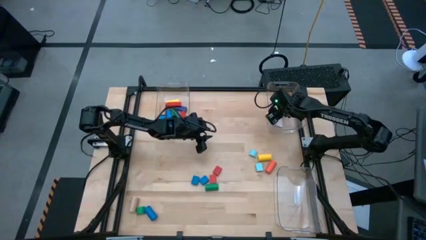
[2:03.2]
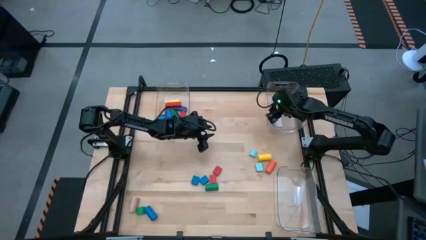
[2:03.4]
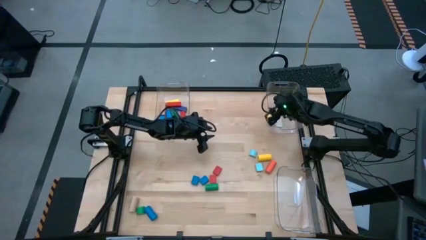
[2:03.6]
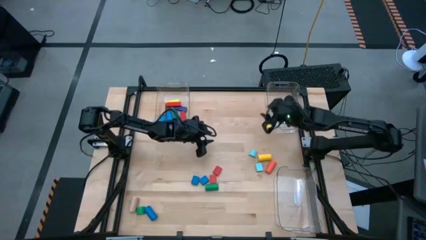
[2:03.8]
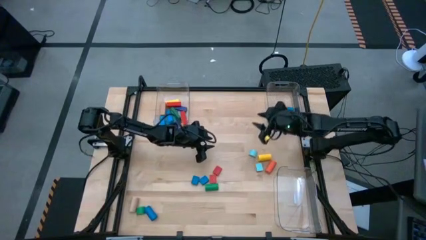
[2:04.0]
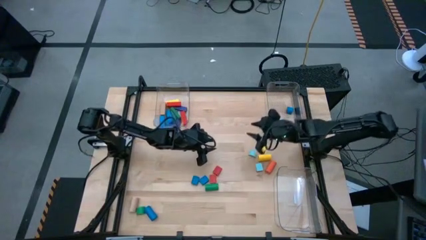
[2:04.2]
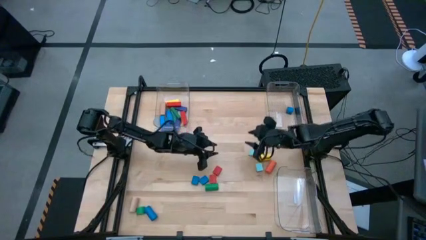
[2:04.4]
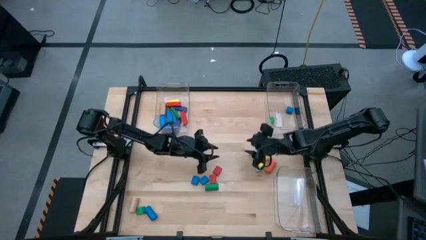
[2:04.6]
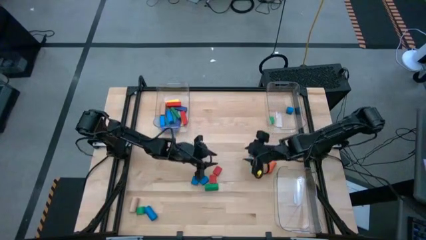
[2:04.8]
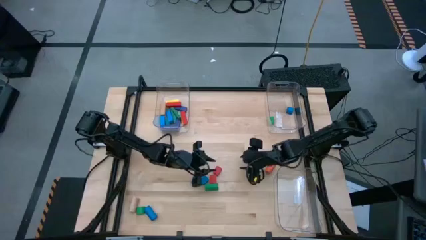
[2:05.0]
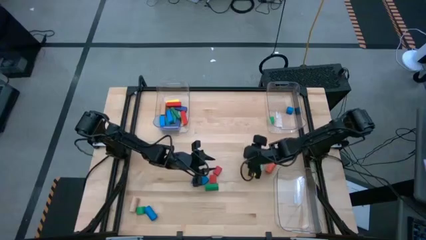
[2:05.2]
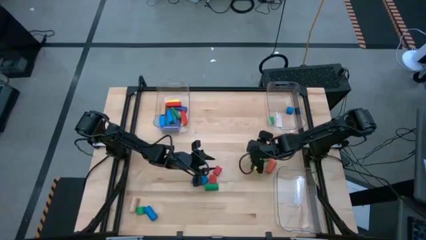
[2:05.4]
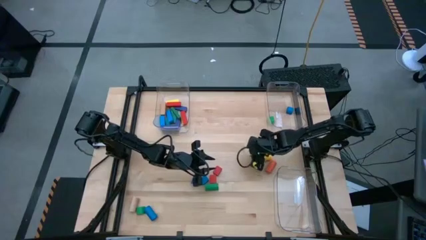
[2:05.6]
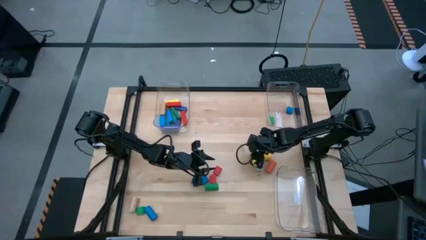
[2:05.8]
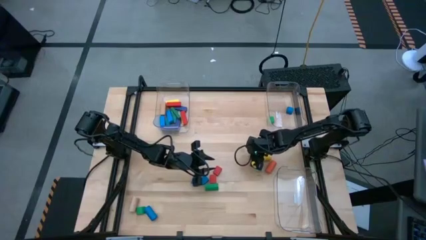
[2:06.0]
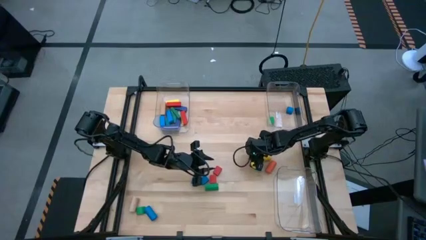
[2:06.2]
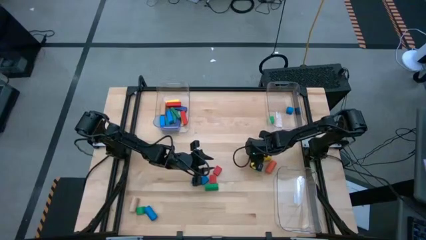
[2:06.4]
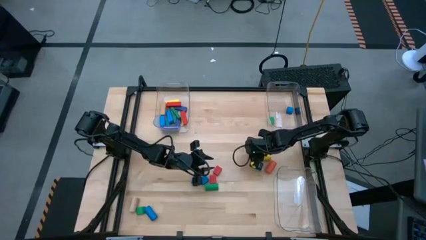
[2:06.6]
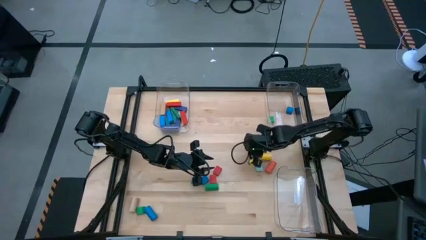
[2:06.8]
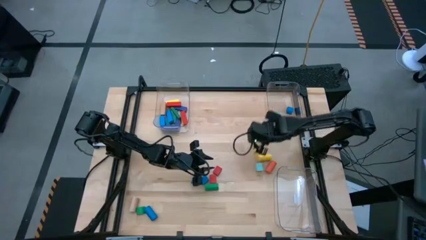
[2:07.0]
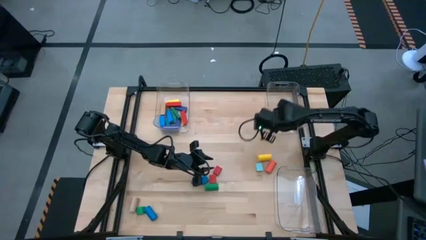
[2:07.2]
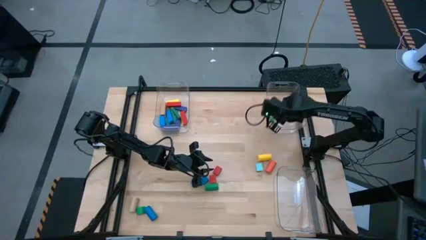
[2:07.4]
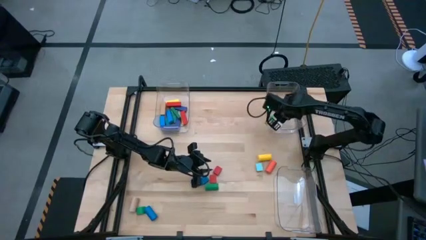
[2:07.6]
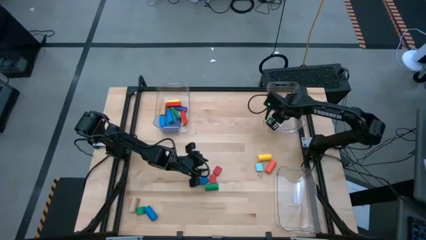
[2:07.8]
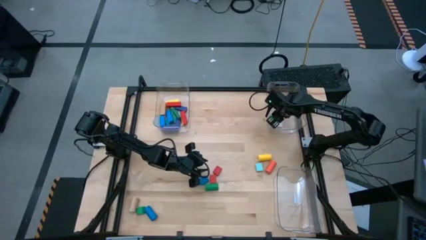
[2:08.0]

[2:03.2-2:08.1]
Task: Sort blocks by size
Put the light blue half-circle block into the top right transparent bin

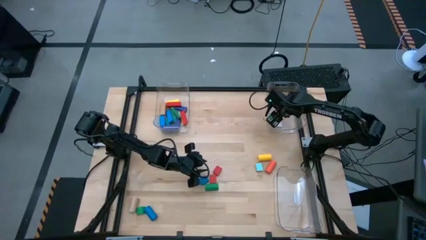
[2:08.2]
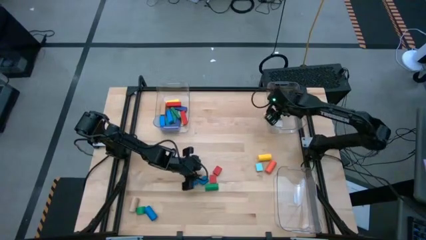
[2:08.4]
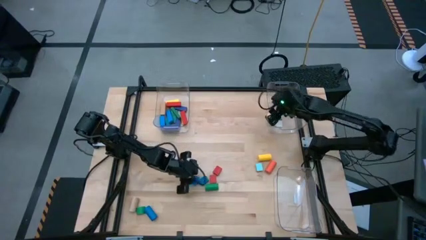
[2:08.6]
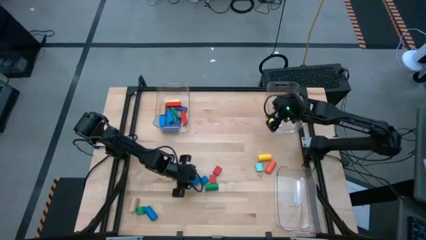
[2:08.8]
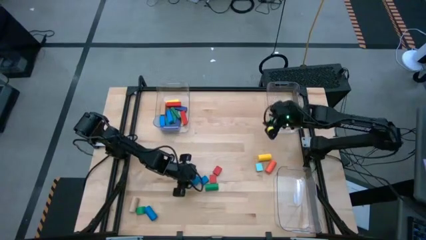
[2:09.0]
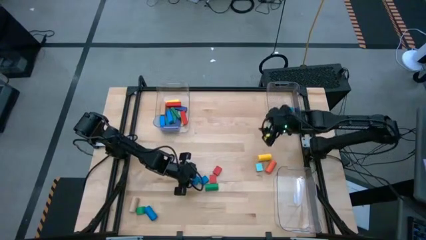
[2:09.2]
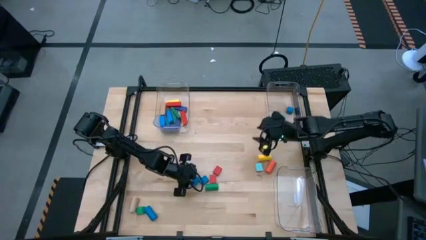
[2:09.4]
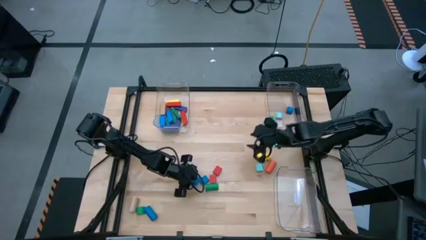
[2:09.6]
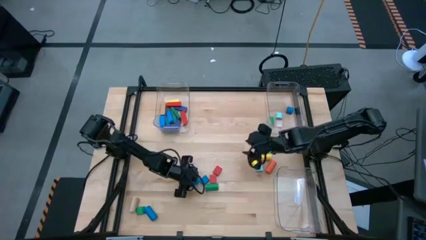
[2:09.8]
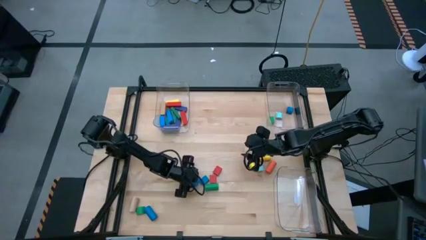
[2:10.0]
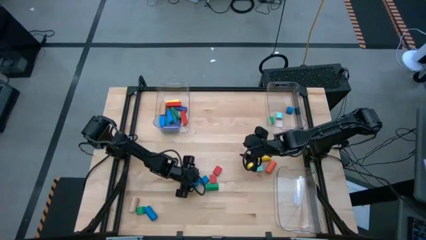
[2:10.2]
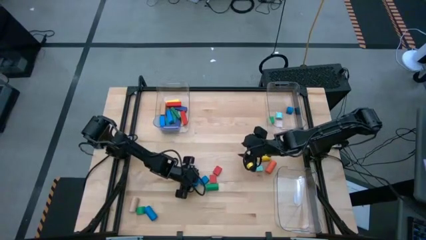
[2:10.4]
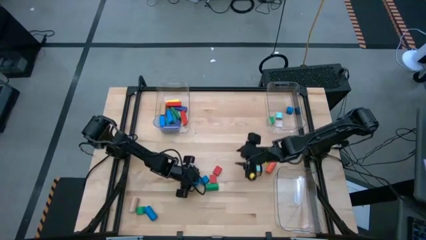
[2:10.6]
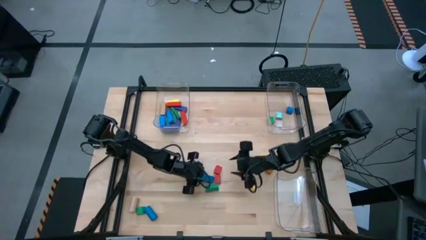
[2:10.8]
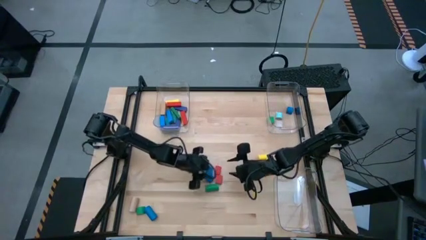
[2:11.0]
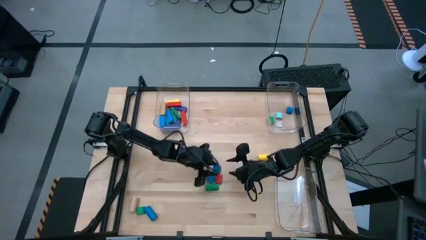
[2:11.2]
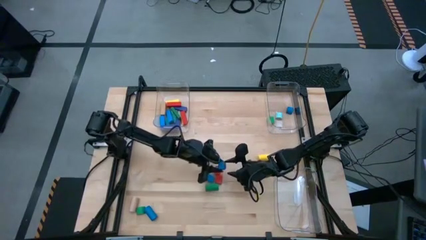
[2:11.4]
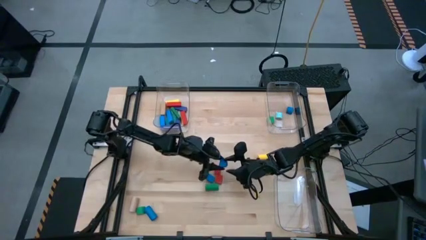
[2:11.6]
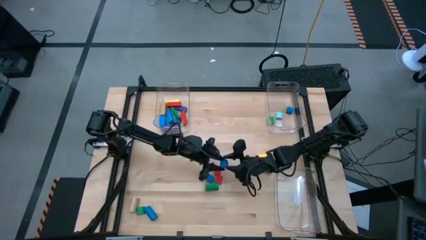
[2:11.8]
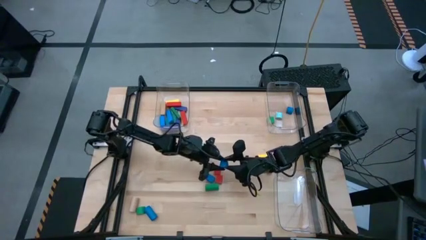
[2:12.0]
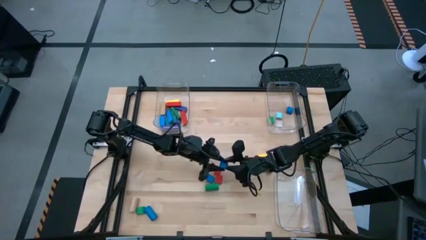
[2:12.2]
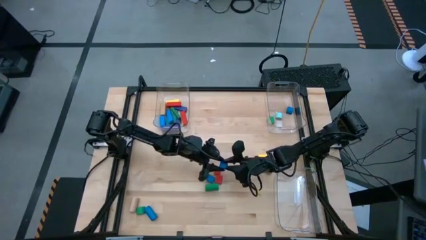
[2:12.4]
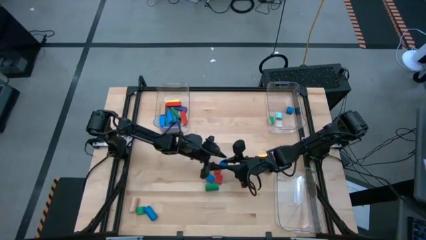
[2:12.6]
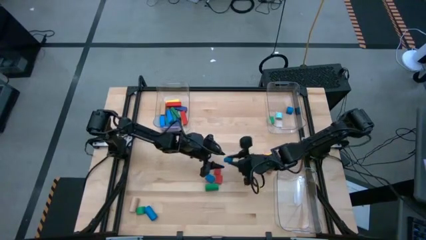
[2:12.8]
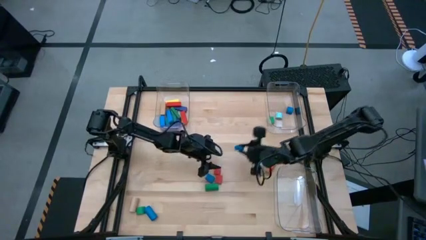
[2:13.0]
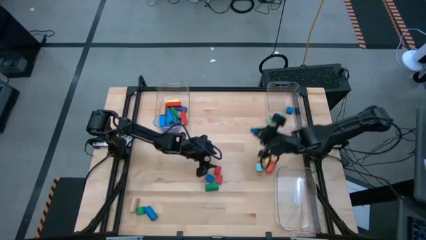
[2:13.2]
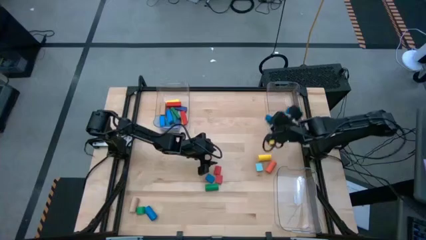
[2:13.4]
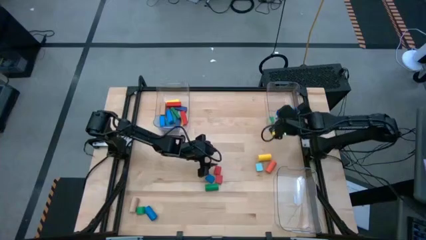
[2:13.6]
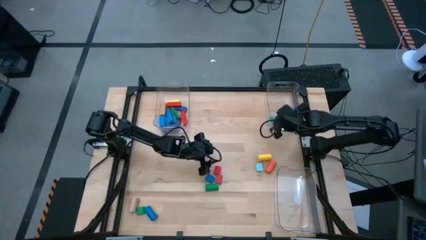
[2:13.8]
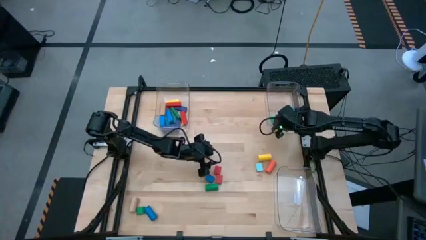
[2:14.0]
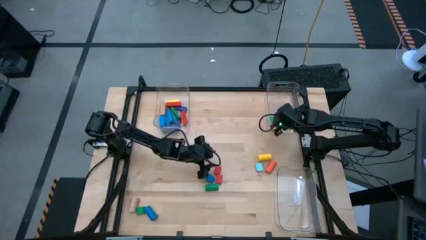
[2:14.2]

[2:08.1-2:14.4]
Put the blue half-circle block into the top right transparent bin

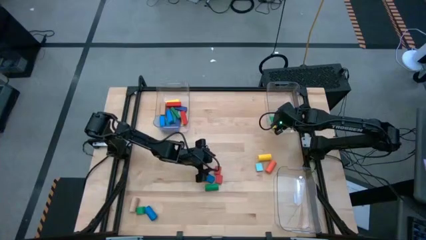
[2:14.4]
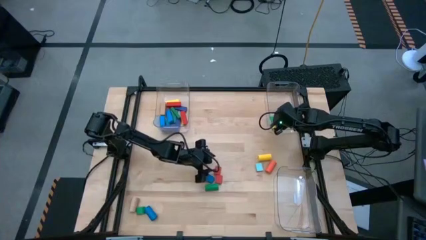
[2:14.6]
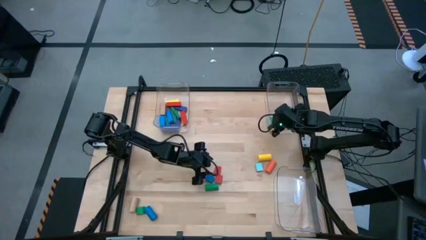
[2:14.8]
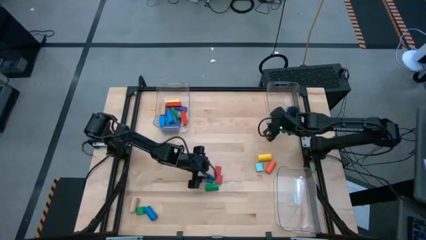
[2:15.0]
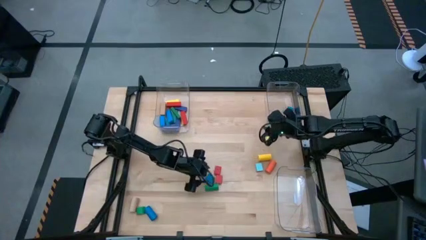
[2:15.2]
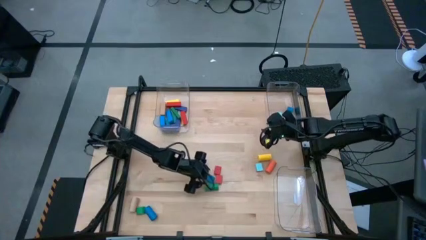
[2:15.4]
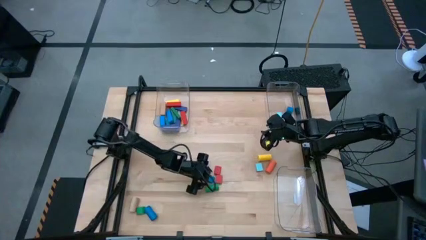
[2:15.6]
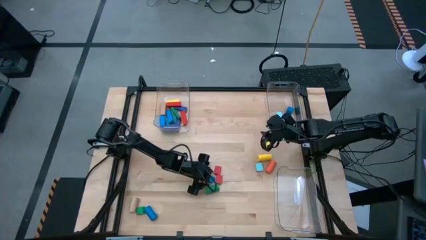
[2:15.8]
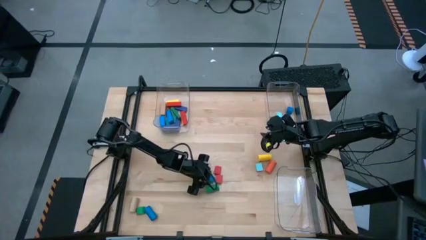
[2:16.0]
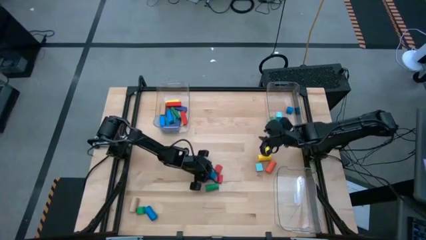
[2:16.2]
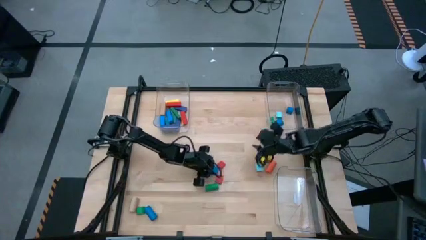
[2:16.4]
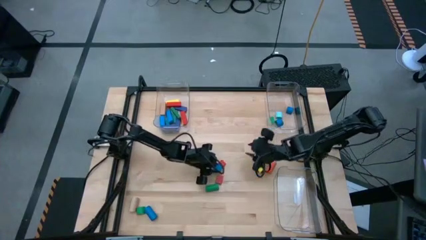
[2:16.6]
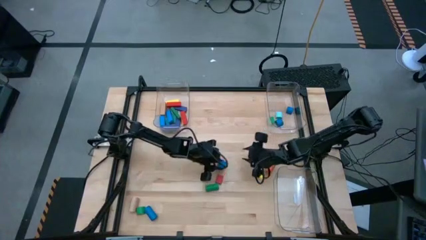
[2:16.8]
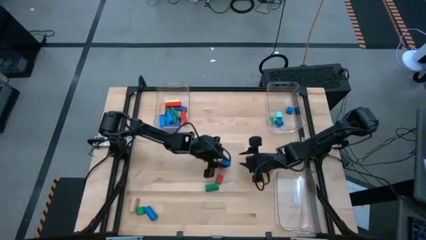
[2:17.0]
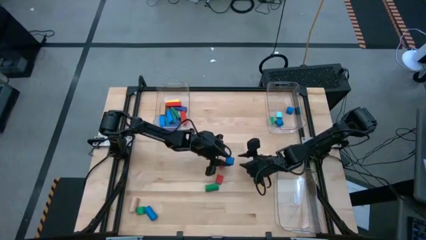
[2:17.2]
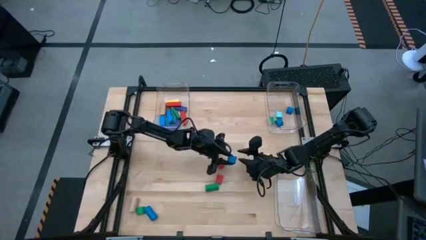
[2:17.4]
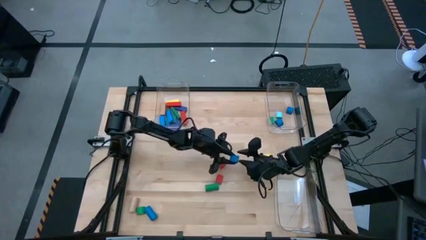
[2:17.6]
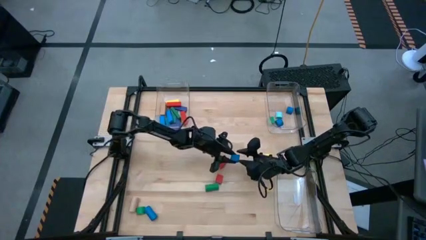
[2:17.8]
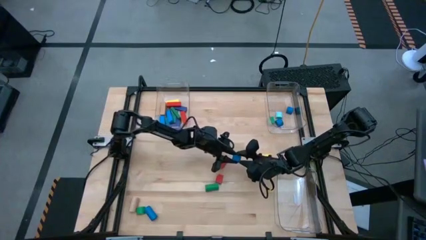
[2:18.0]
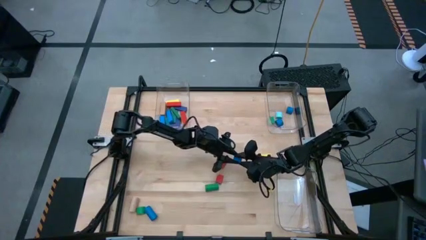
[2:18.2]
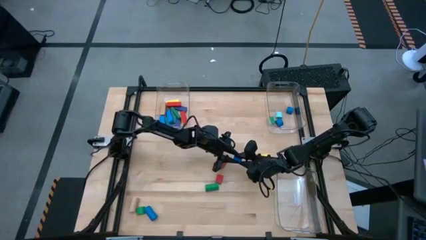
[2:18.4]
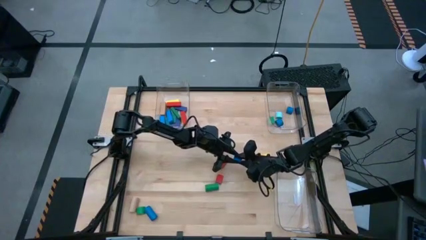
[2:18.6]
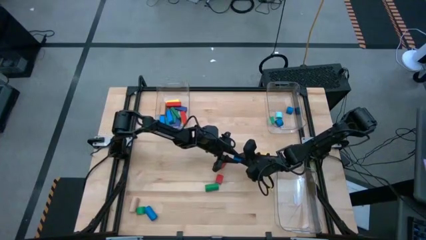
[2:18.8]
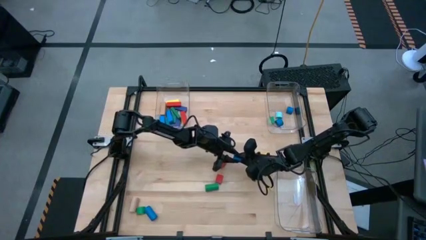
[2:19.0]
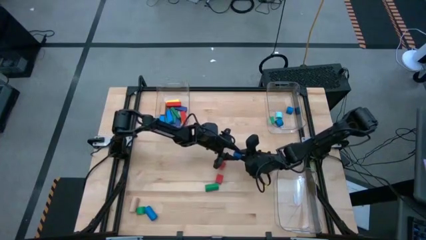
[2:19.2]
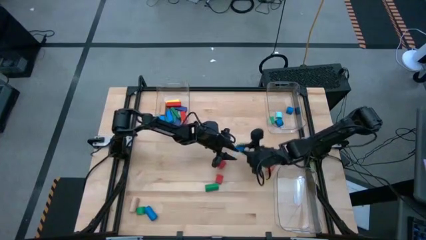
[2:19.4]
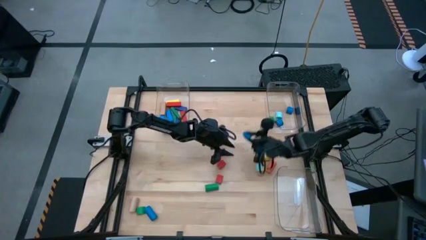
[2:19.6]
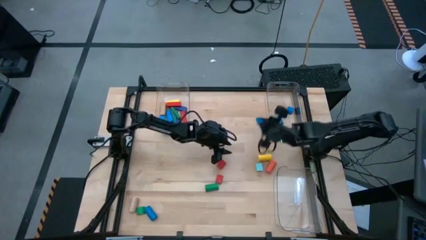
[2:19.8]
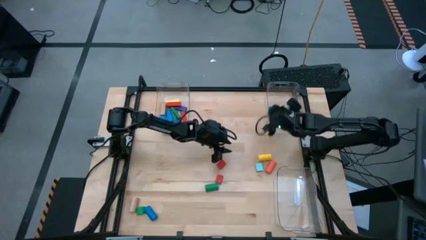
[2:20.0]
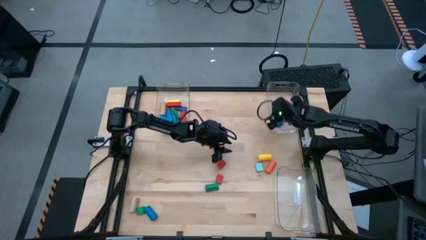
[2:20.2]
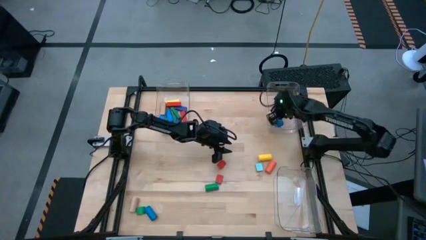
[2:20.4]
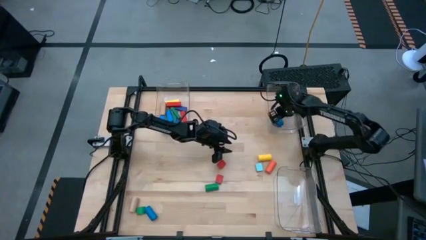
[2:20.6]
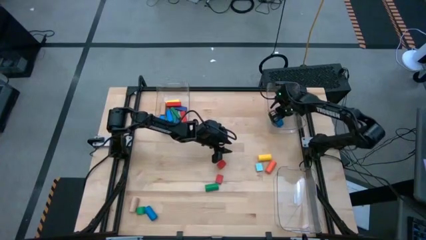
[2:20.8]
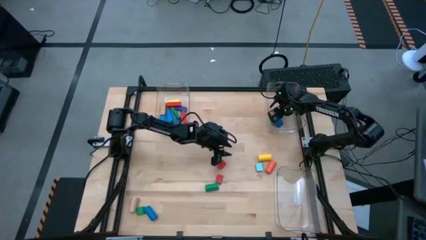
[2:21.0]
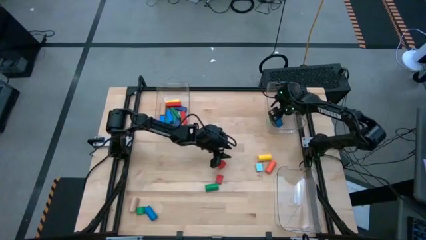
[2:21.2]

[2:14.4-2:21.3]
Put the blue half-circle block into the top right transparent bin
